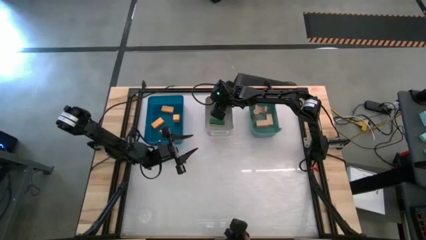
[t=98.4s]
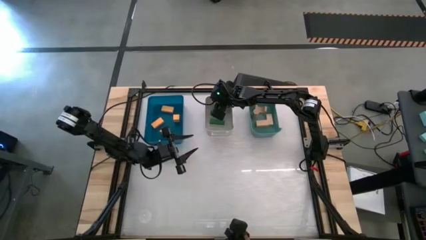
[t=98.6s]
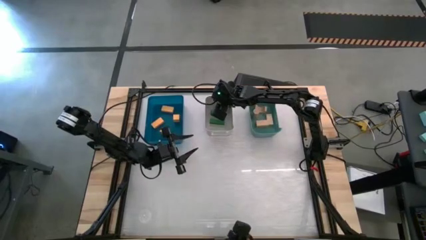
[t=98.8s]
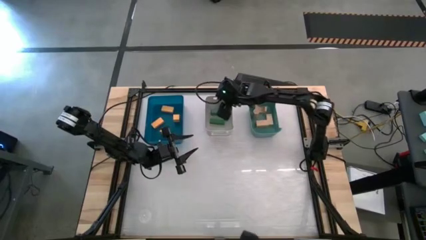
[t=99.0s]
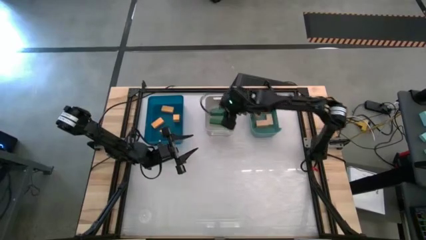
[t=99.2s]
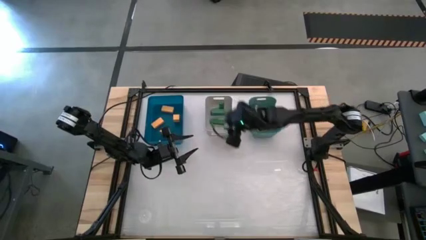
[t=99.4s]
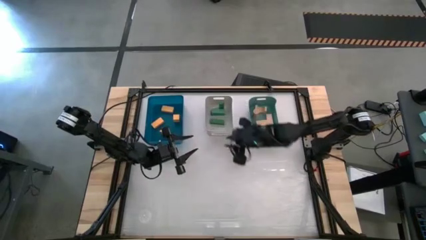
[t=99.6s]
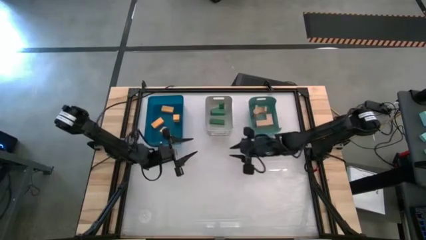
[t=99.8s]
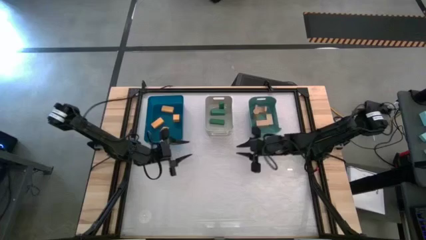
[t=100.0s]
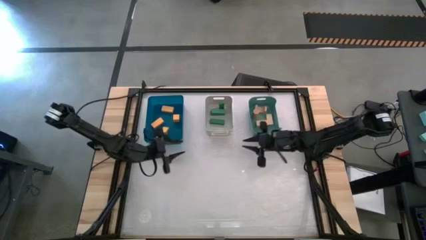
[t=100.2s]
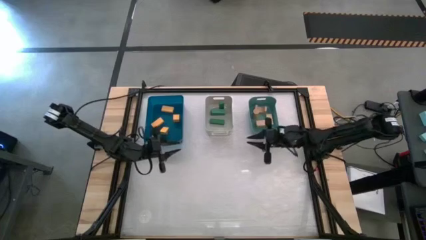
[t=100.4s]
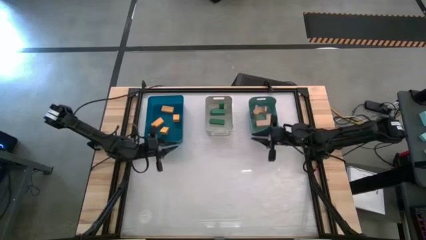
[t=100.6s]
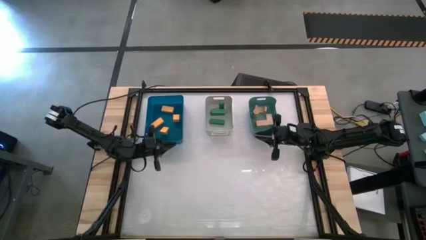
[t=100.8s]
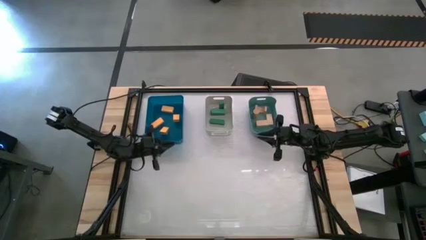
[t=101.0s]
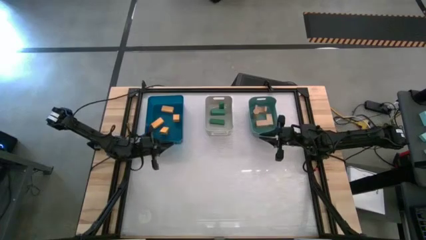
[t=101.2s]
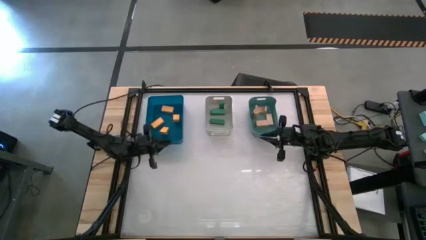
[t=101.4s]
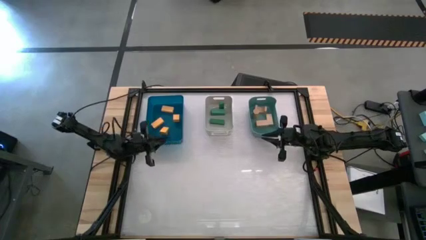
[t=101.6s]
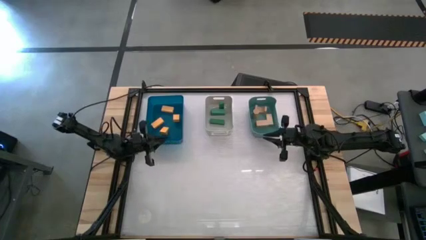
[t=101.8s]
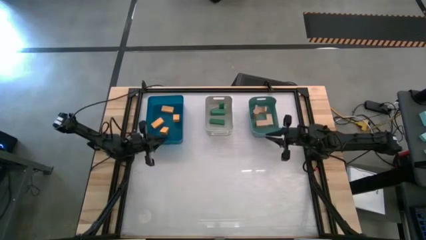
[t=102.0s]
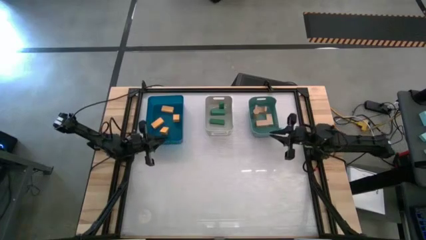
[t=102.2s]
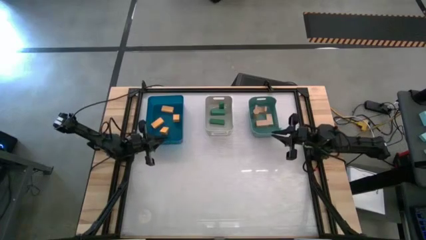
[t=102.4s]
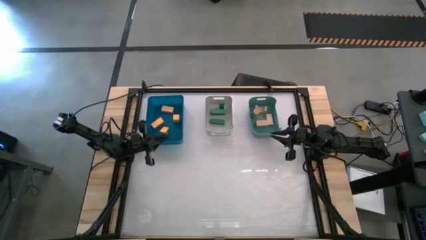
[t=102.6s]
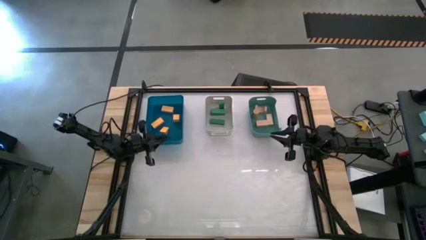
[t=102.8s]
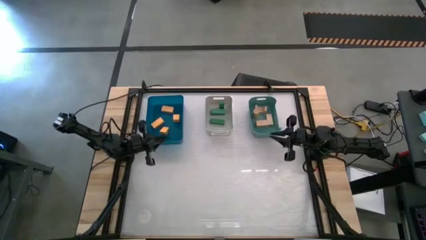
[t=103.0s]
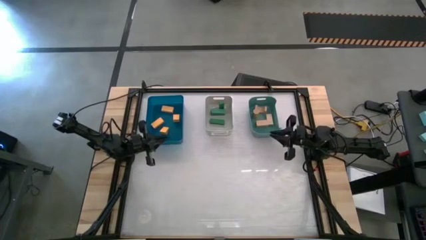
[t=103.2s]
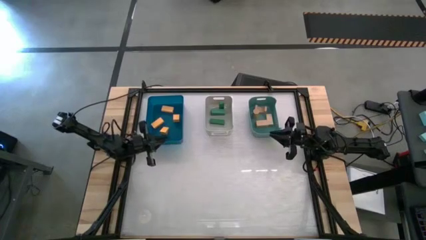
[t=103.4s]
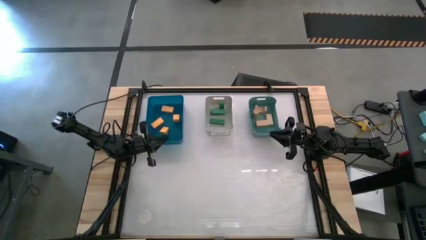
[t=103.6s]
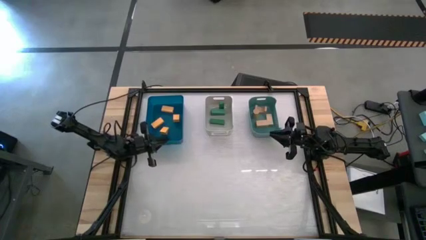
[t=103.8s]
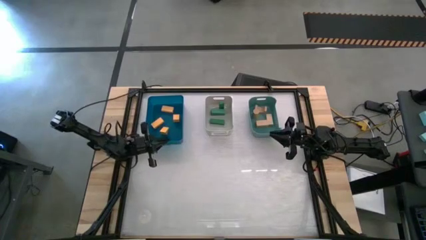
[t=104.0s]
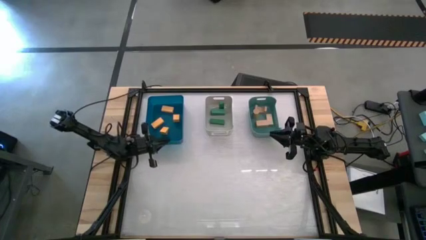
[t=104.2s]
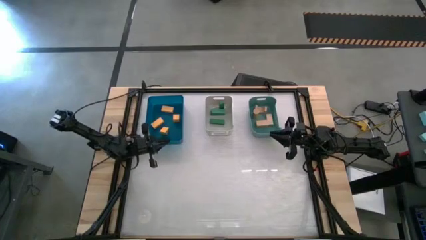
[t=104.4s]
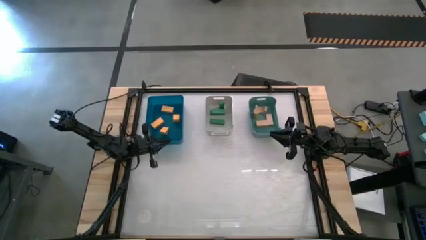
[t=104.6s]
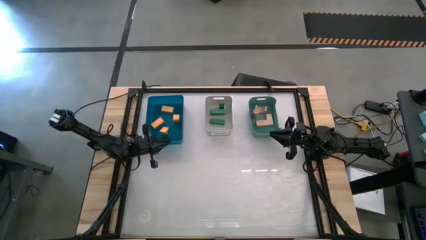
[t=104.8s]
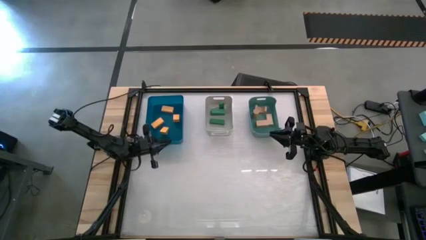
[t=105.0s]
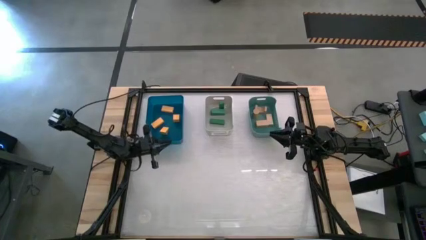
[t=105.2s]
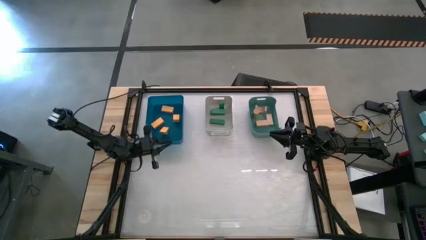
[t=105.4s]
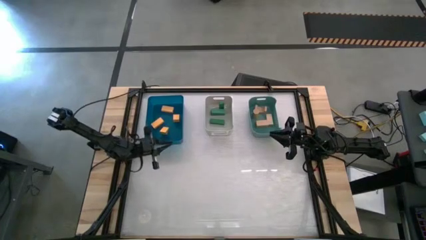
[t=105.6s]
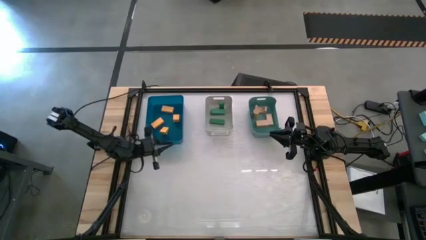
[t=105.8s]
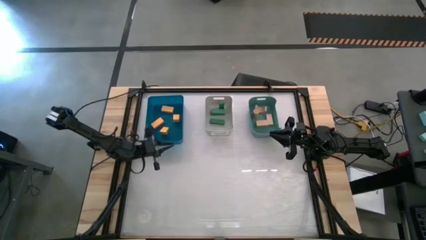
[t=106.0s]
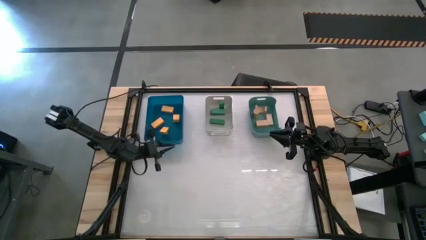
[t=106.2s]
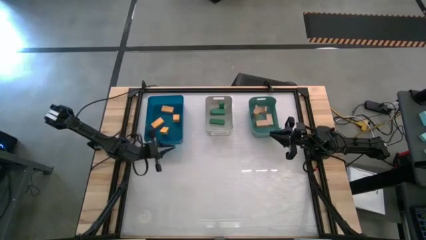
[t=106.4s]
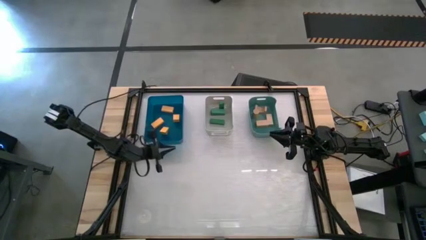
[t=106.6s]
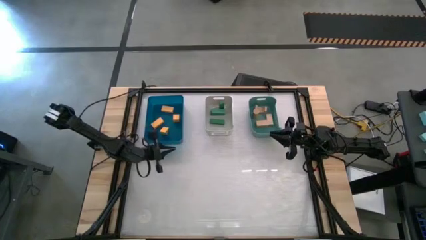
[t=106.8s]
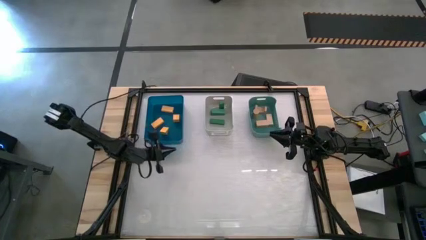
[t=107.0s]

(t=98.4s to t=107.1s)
Task: Sort & place blocks by color
Return to Home Position

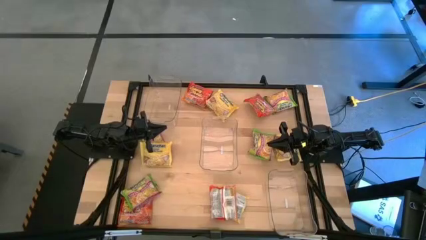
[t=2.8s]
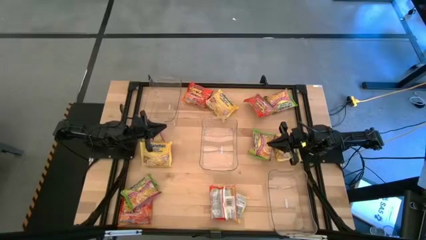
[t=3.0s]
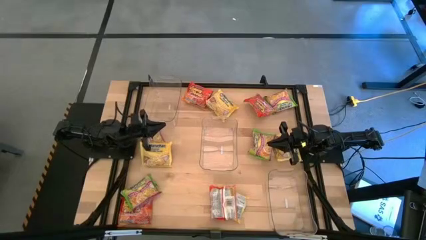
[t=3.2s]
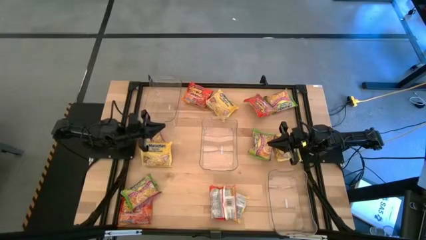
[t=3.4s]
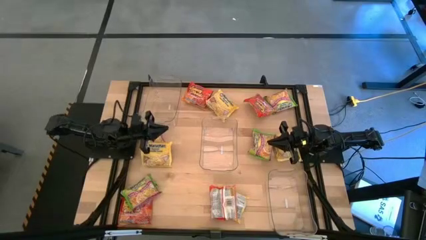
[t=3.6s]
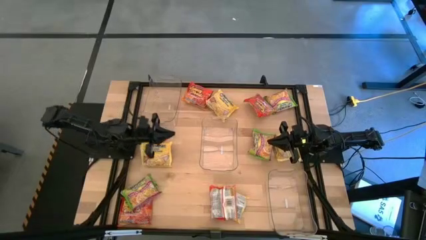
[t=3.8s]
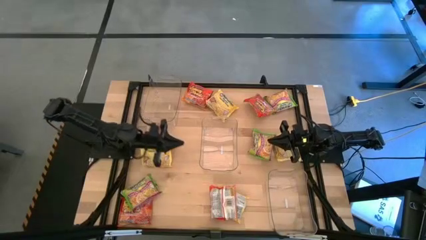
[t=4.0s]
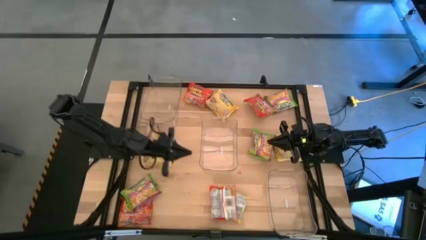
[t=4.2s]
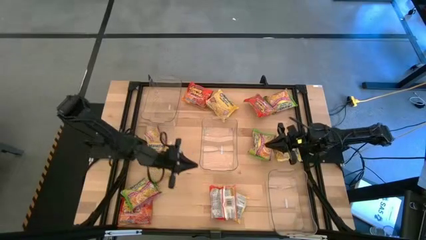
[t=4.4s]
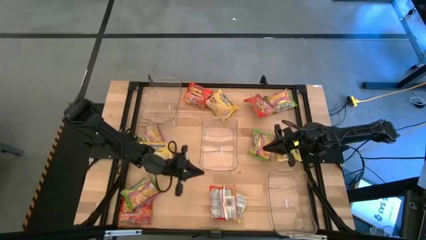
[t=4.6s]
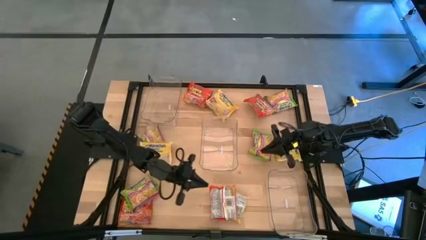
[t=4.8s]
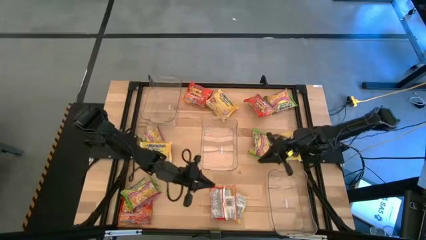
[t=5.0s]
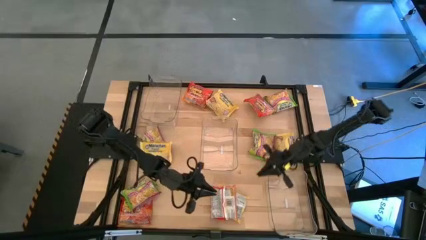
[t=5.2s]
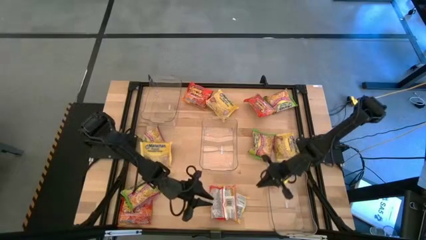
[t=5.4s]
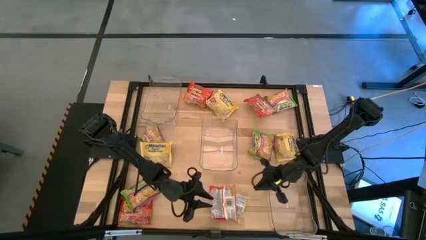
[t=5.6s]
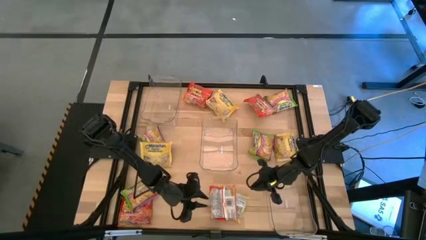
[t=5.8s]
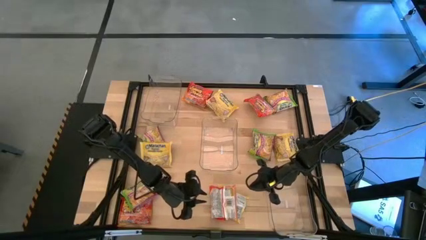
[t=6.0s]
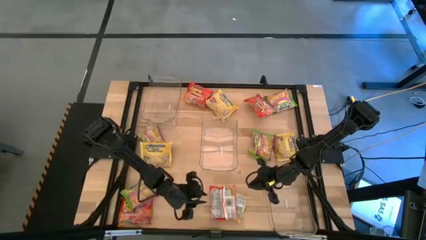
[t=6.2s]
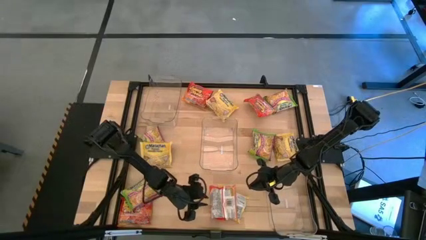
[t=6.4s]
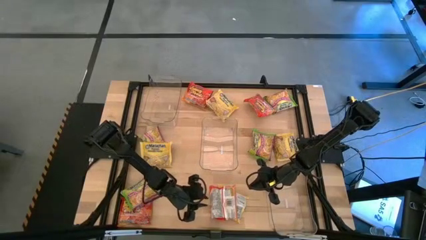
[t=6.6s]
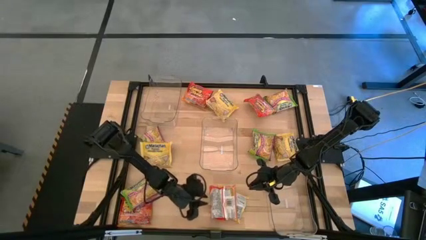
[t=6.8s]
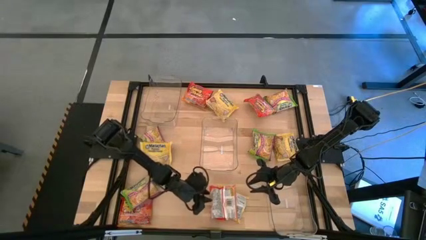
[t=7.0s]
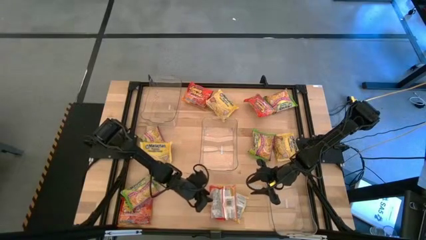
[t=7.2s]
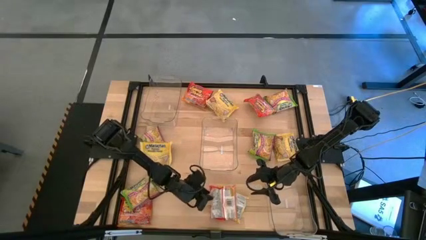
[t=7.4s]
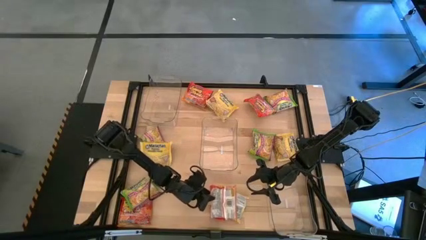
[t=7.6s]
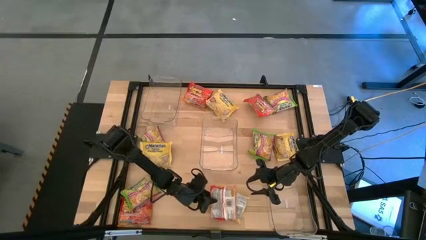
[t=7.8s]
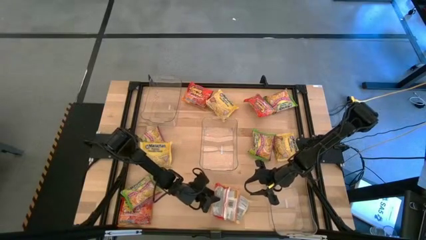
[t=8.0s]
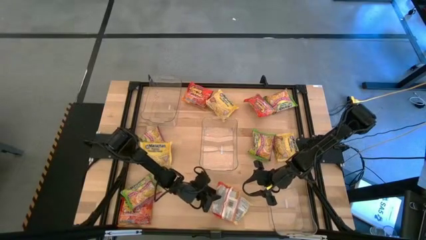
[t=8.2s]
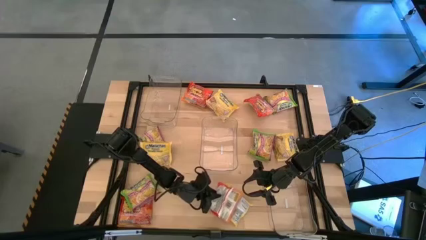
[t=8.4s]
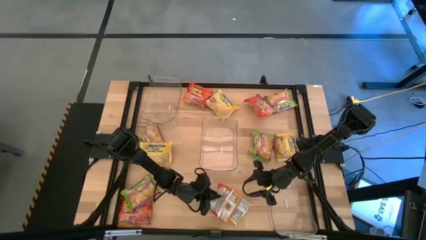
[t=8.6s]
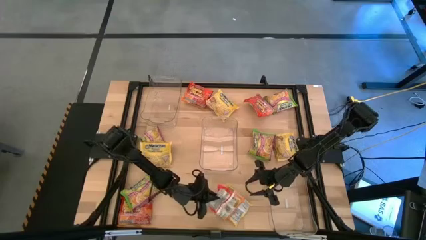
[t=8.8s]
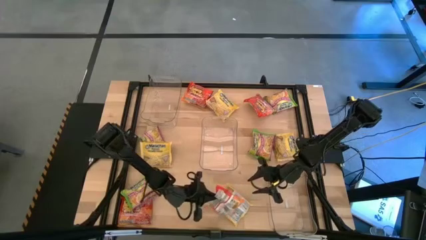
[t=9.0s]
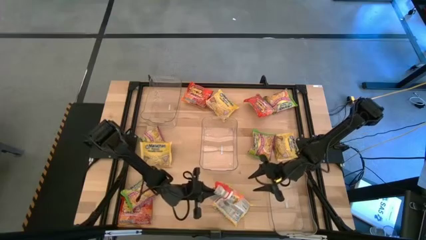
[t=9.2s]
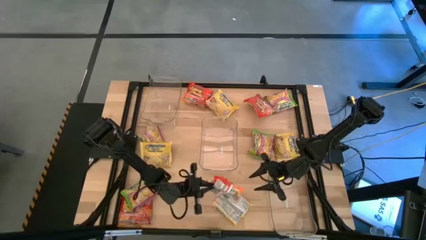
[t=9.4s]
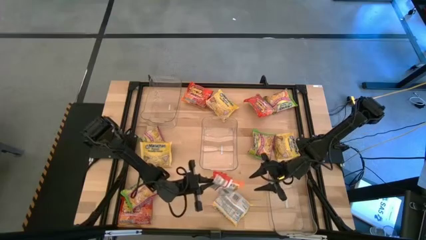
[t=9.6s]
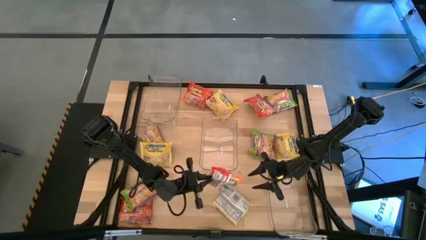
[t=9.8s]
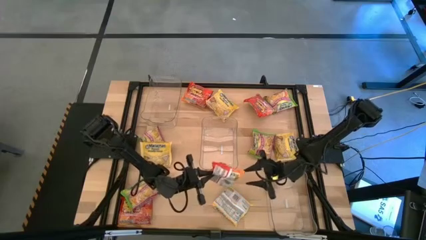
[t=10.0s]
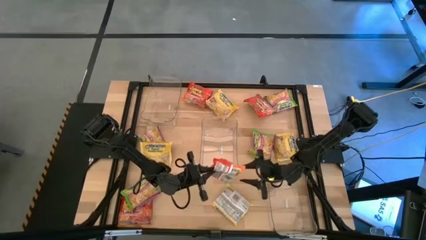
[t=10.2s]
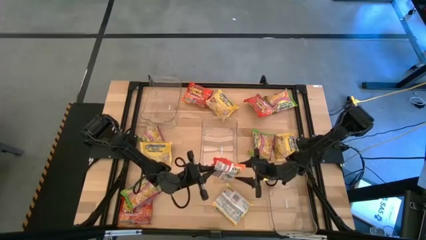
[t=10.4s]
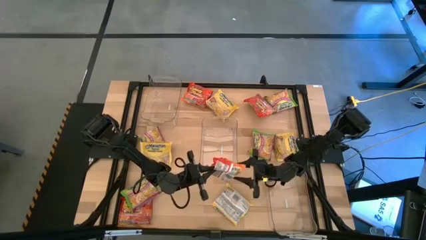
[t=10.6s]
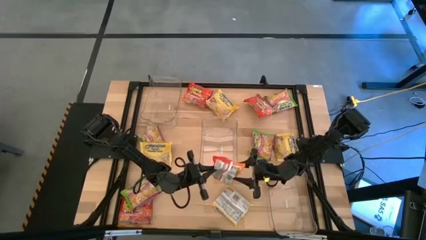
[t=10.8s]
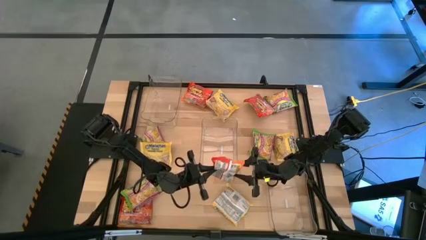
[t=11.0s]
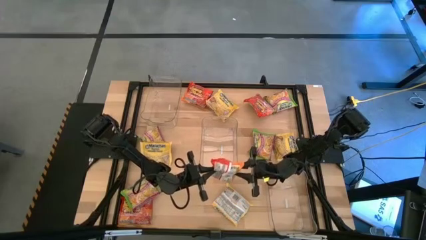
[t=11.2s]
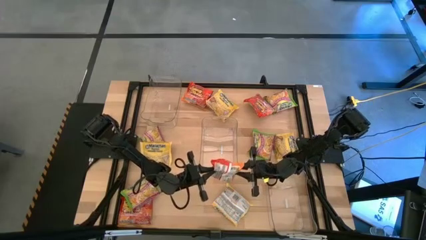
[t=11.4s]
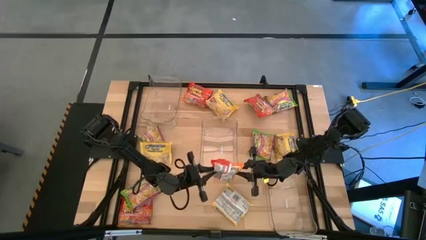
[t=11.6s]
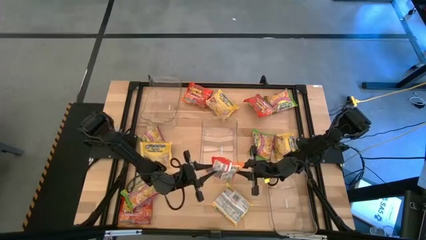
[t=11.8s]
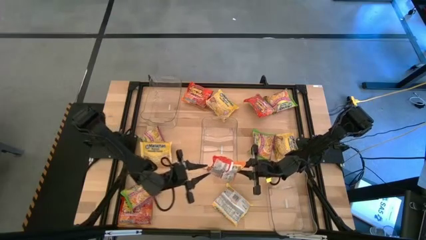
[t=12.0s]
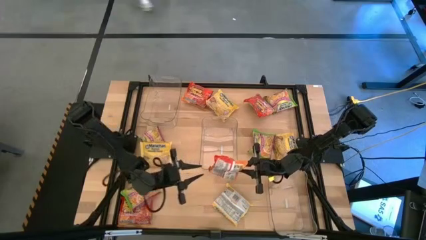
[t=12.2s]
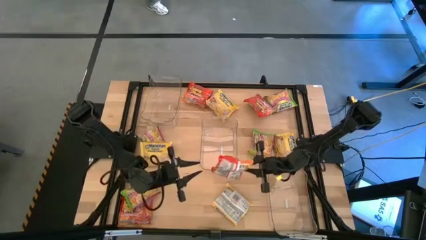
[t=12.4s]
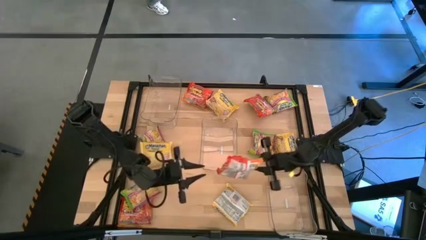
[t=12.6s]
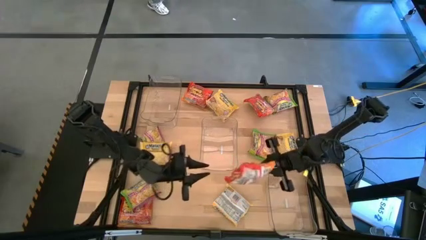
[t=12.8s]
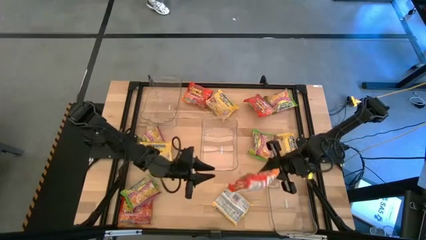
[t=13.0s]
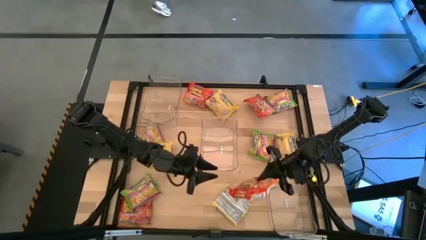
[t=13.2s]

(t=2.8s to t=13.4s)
Task: Sort Maruchan noodles
Put the bottom right orange noodle pack into the middle transparent bin
